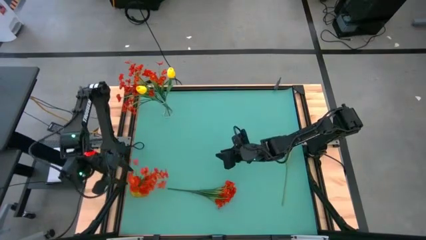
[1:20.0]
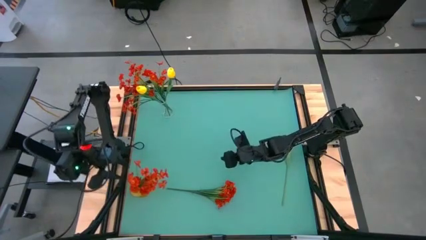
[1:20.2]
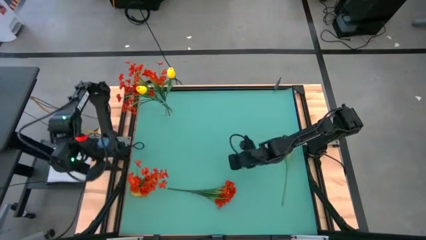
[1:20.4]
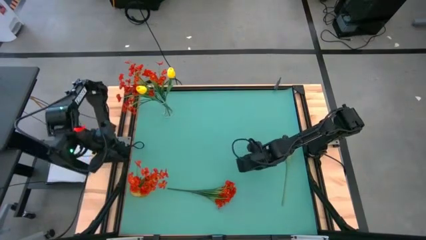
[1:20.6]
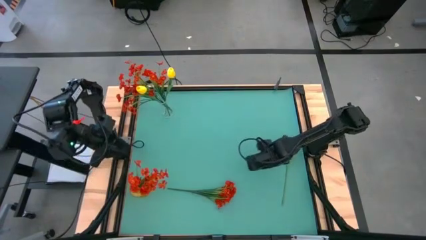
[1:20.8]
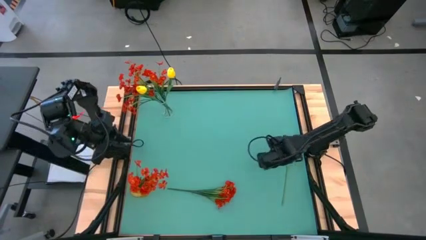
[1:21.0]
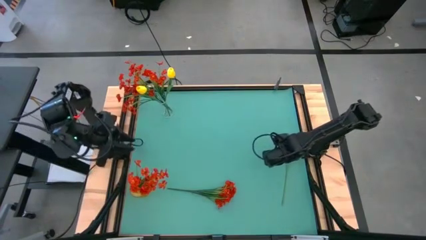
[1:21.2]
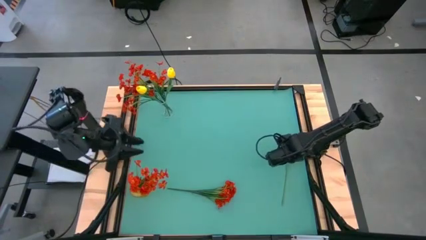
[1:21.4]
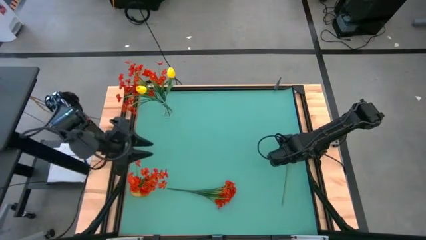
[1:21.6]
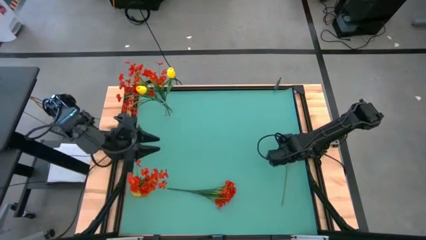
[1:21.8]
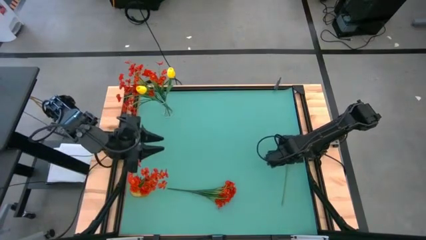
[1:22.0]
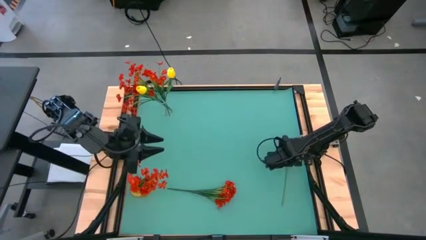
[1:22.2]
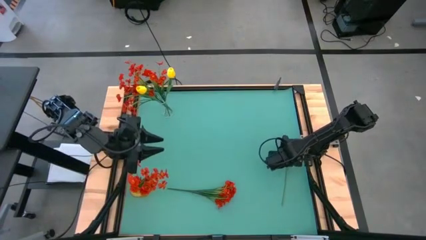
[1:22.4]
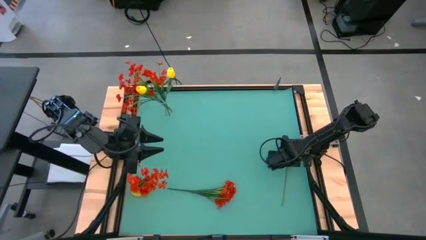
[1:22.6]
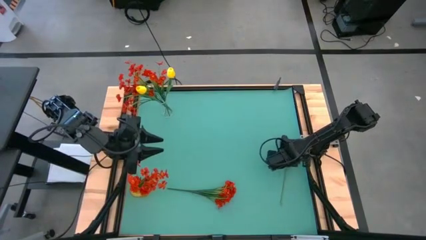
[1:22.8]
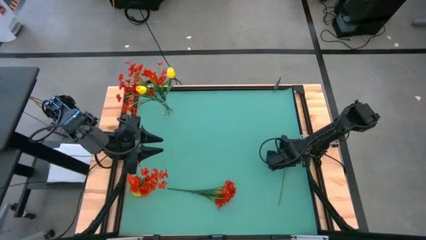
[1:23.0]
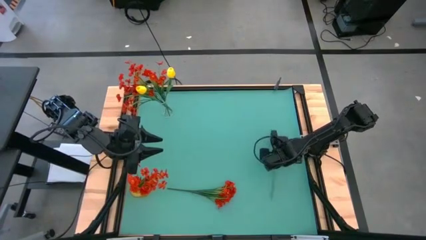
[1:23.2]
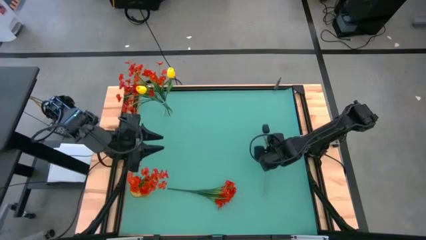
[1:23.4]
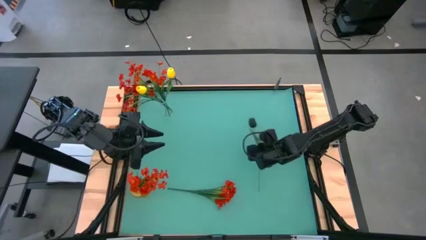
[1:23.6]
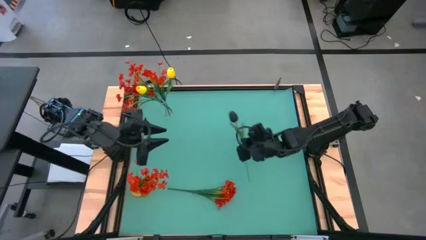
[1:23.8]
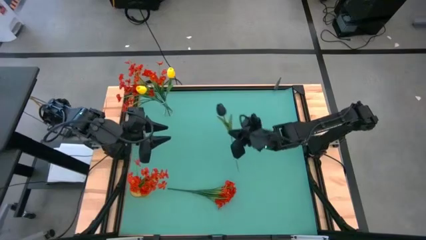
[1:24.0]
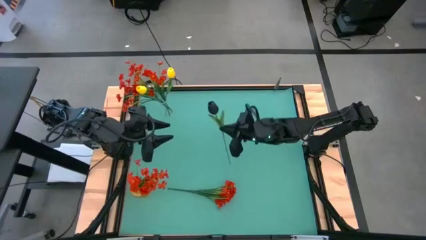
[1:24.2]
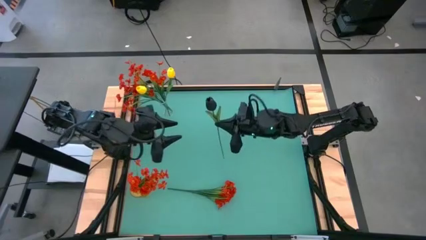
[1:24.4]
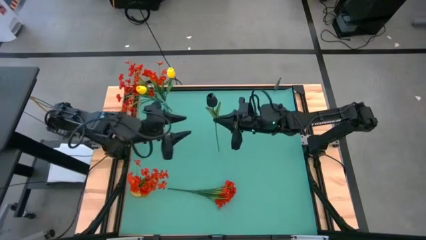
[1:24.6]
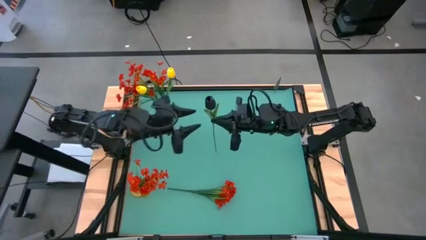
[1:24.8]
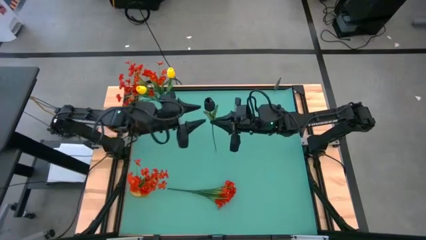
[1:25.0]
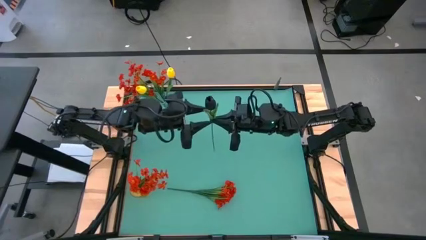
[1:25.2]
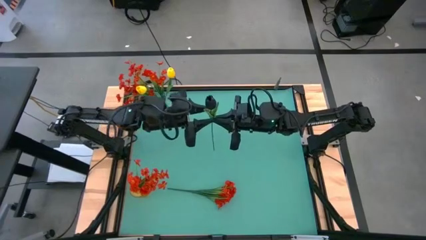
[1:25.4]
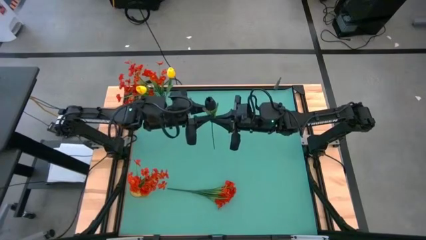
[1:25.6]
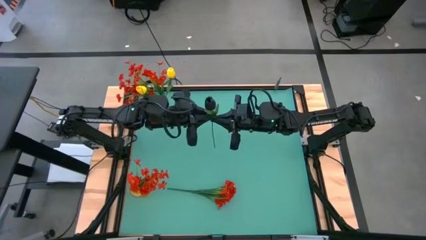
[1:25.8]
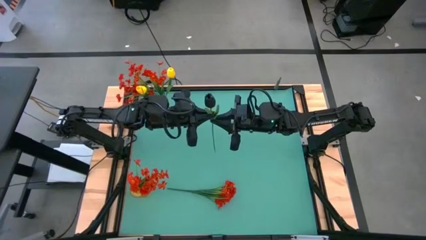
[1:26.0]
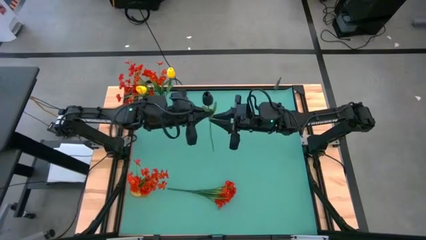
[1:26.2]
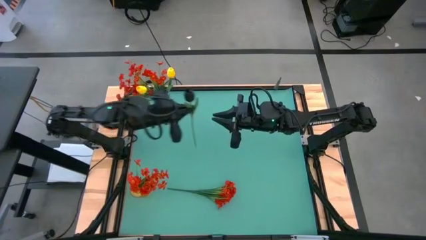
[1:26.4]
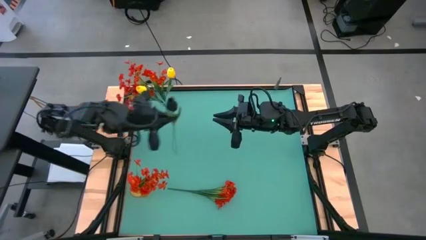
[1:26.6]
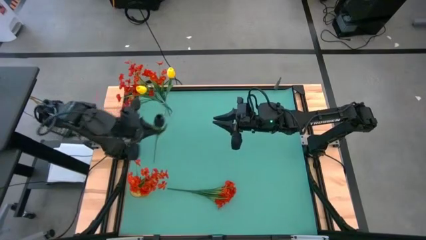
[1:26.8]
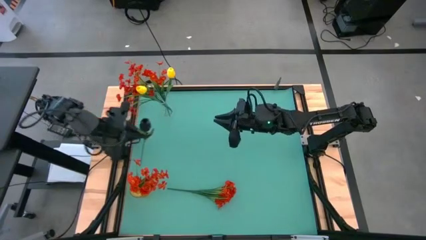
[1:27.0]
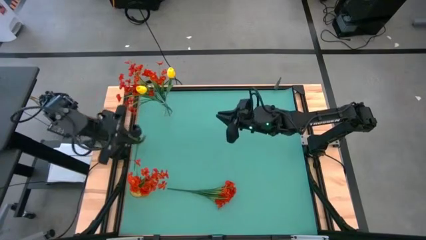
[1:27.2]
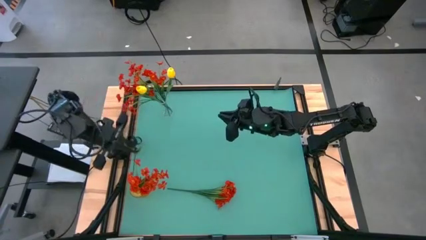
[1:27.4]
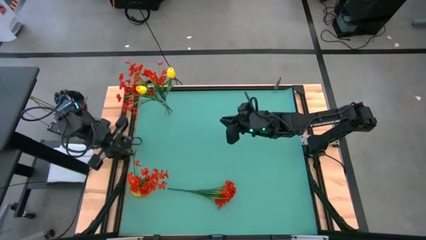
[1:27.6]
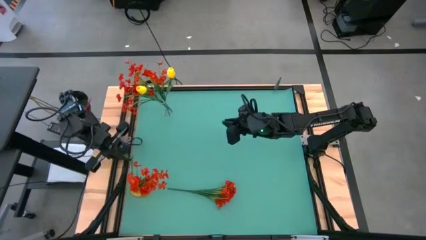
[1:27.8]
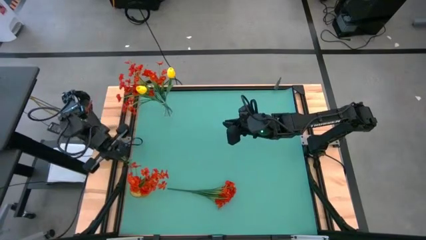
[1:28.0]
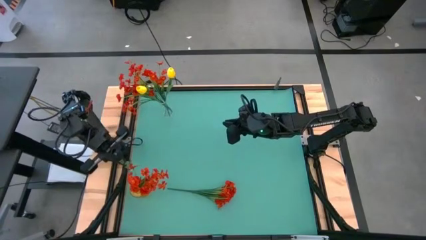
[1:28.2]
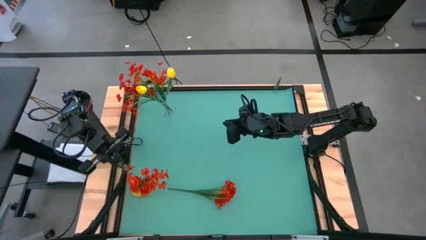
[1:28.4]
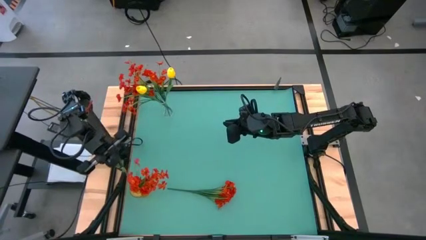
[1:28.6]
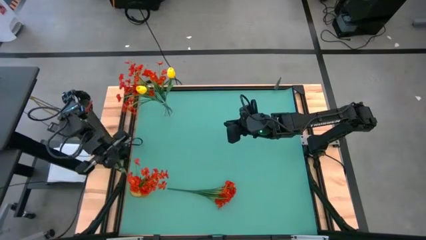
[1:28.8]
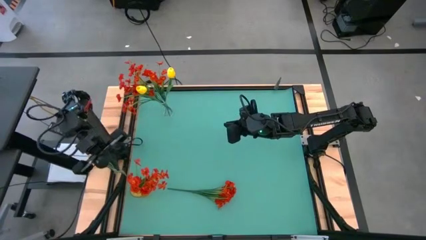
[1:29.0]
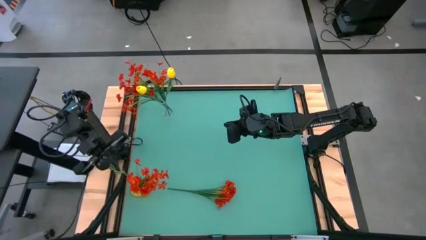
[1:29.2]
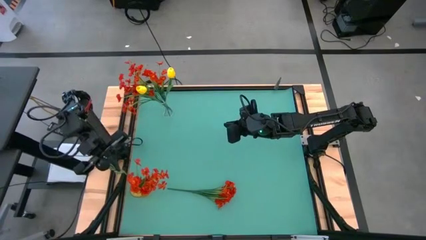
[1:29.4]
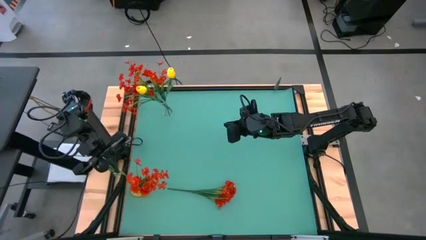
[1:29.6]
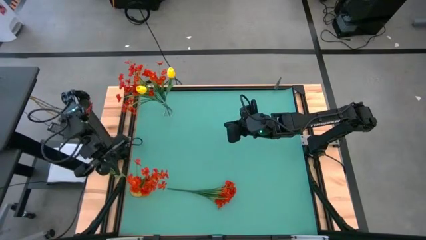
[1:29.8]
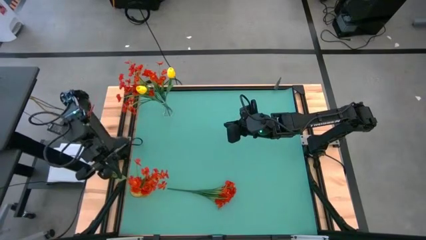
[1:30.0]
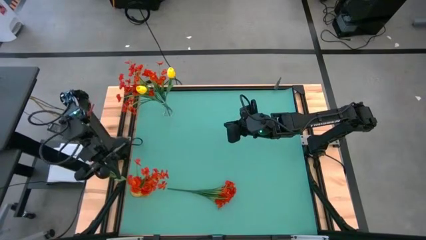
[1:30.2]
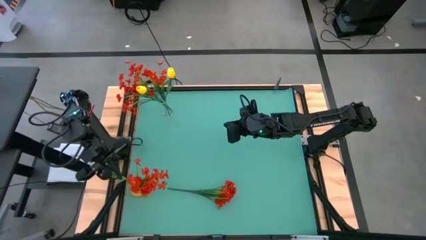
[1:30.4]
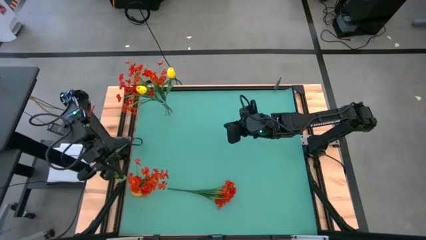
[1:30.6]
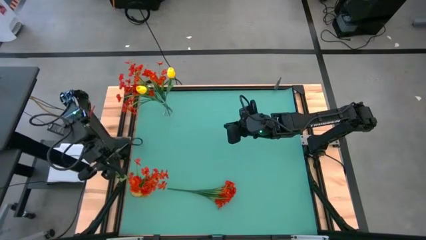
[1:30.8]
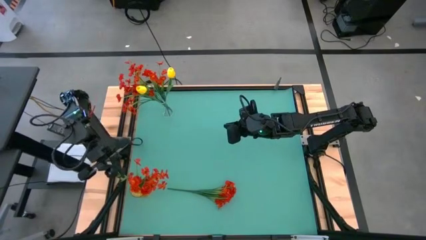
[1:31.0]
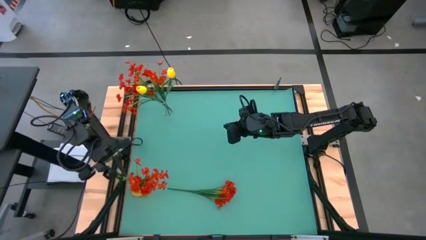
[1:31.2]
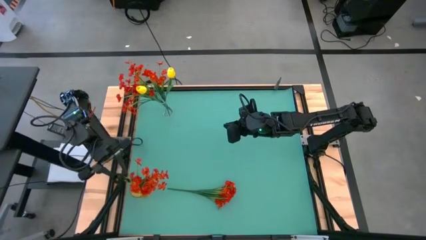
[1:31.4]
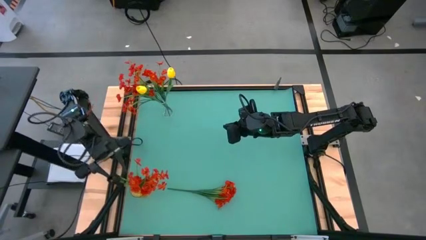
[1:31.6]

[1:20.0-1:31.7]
Task: Sort flowers into vase by color
Put the black flower into the yellow vase

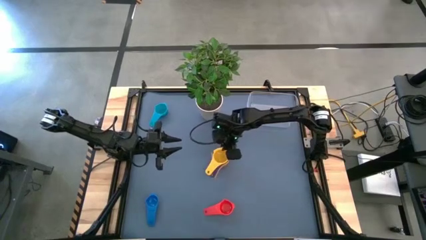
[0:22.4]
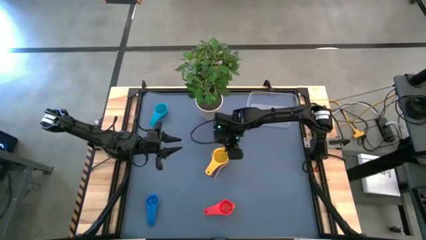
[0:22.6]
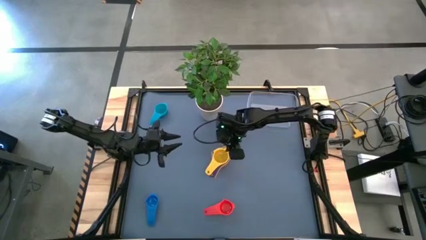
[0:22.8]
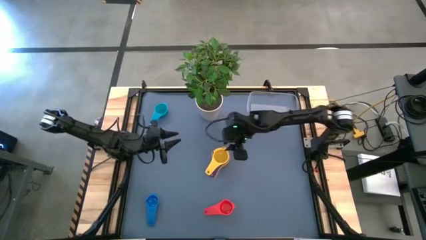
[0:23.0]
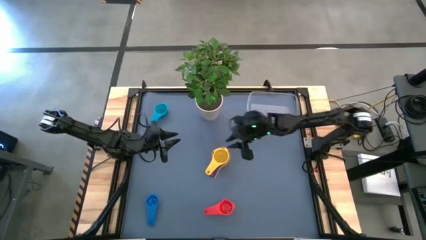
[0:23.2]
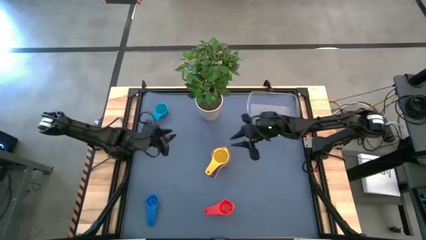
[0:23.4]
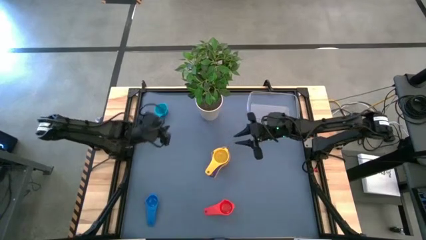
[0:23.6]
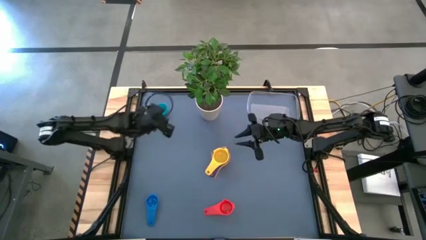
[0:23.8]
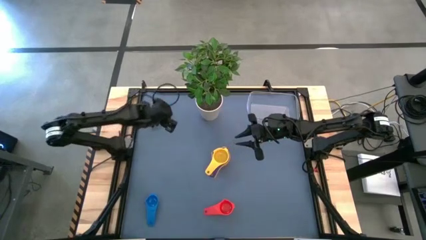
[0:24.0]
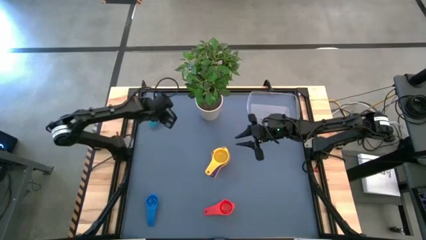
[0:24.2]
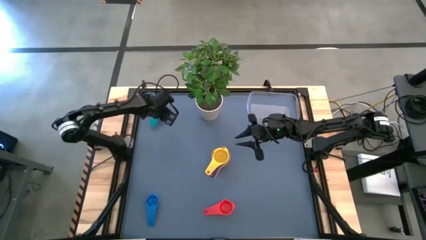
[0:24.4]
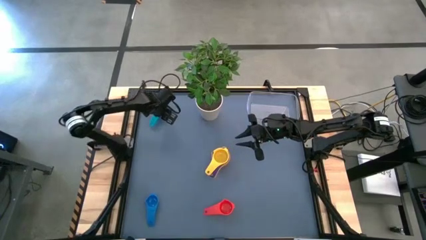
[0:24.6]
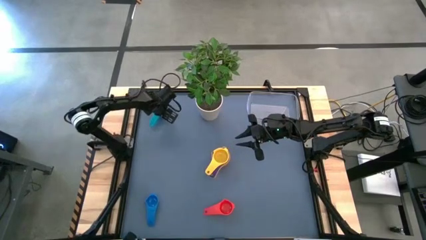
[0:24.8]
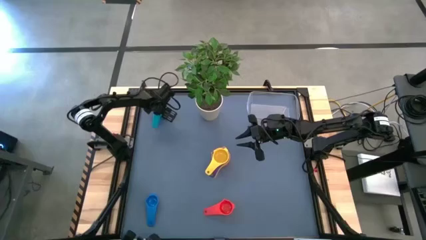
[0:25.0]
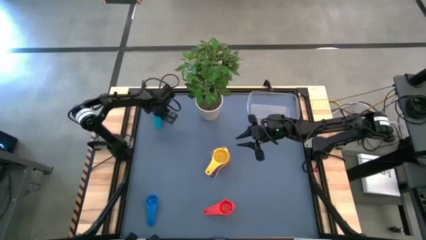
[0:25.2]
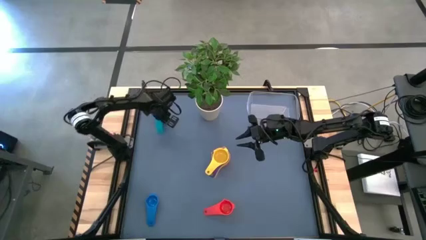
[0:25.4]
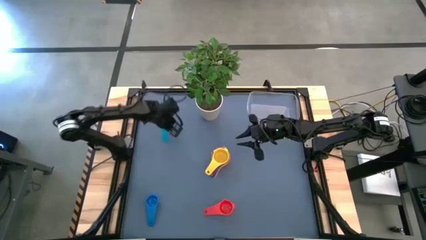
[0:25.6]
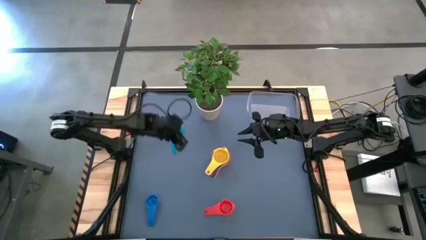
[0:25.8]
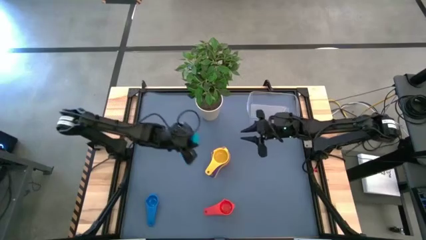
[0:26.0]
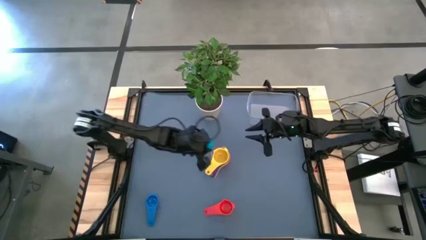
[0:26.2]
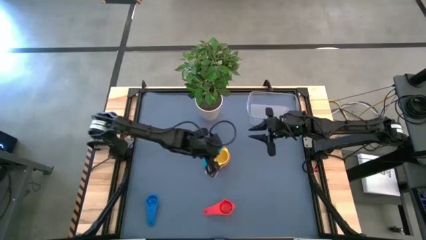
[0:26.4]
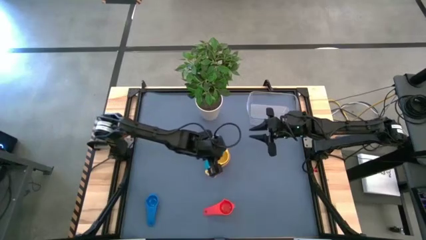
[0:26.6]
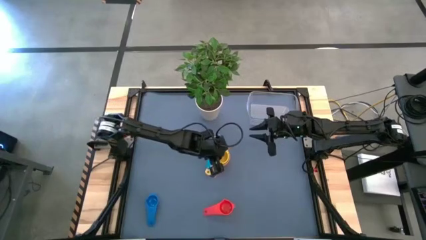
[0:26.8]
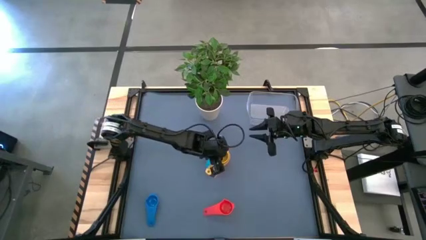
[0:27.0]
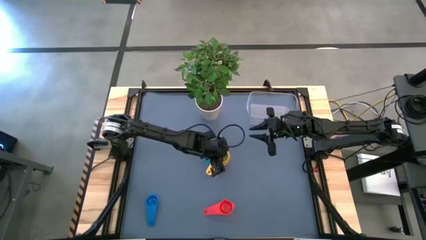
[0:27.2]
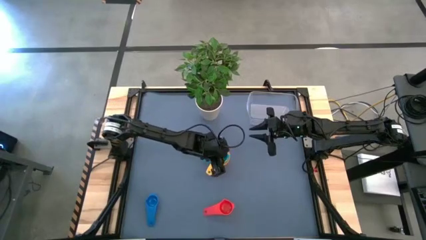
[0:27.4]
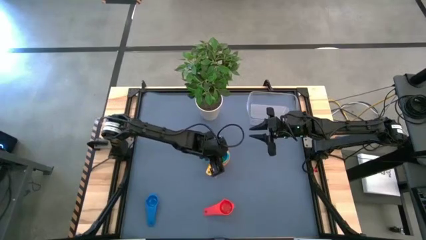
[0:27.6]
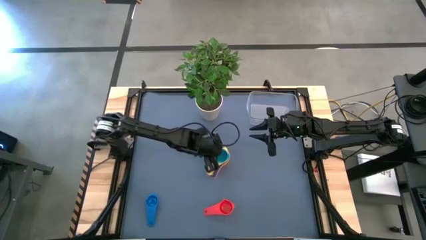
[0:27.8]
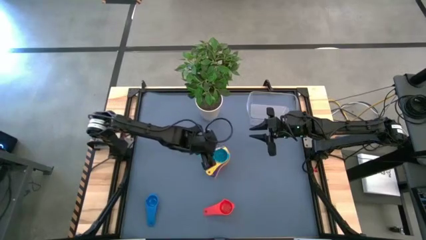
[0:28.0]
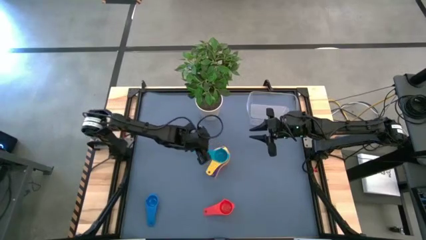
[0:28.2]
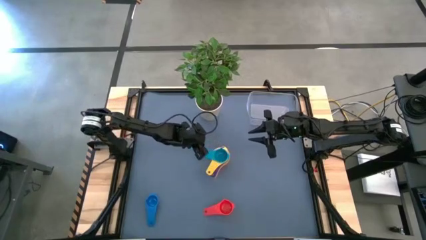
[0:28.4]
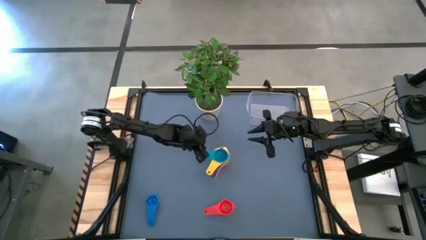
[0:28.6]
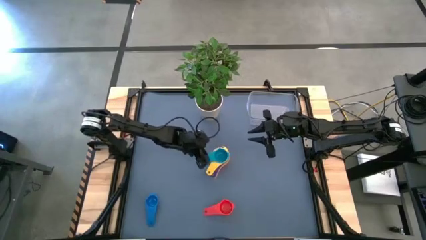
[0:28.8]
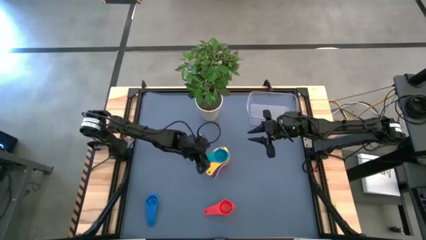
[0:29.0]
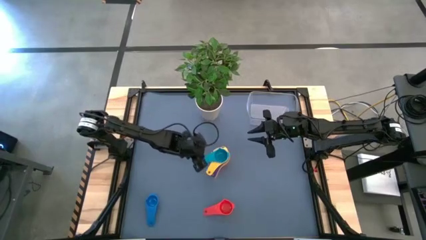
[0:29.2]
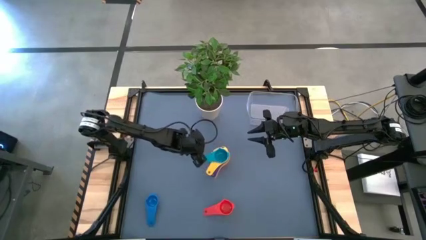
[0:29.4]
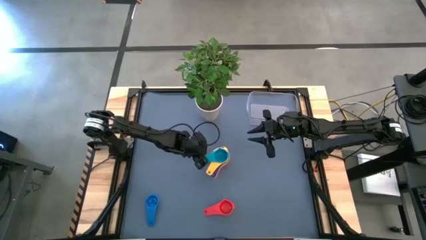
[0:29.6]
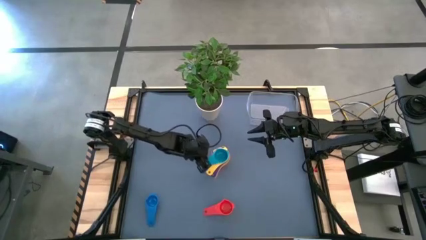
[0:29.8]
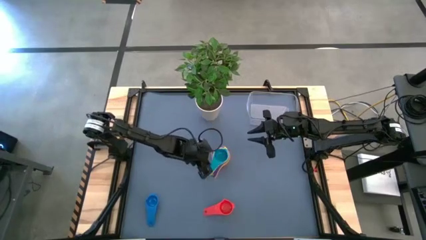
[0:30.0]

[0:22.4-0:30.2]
Task: Nest measuring cups in basket
Stack the light blue measuring cup on top of the yellow measuring cup
